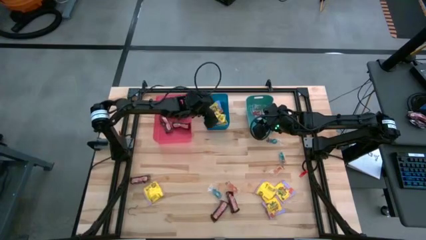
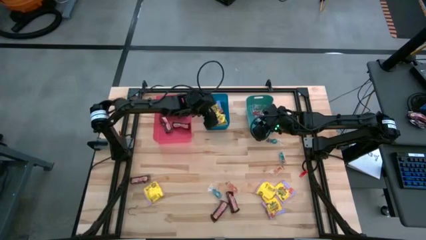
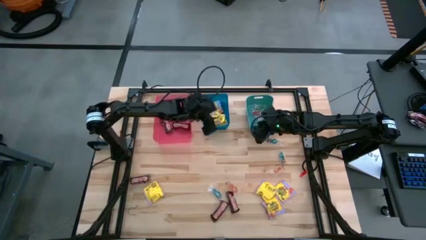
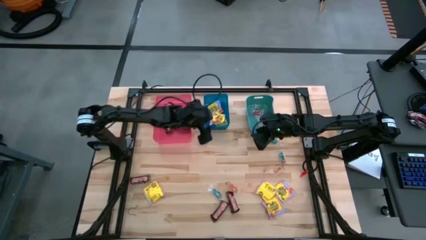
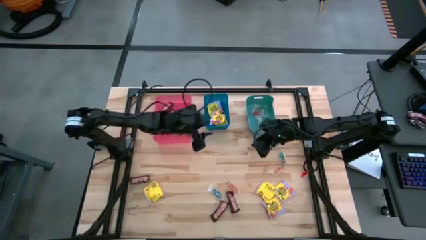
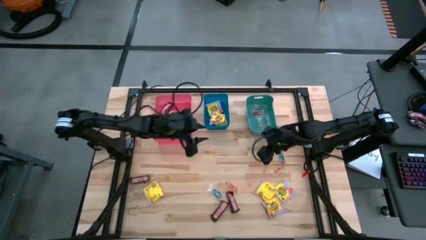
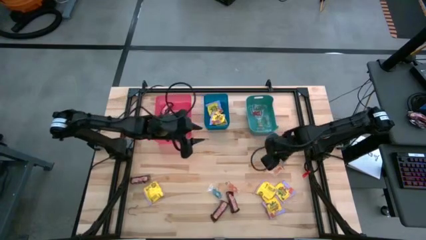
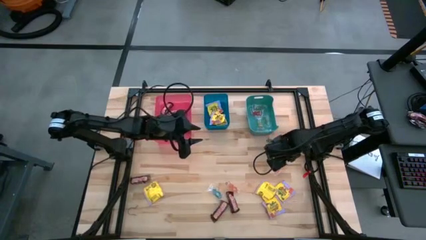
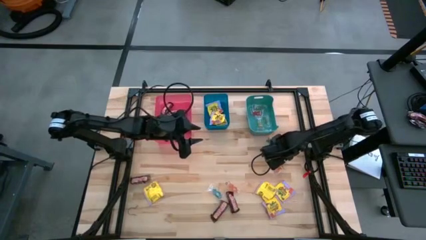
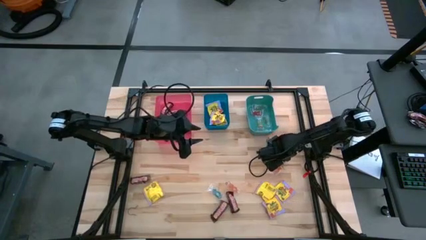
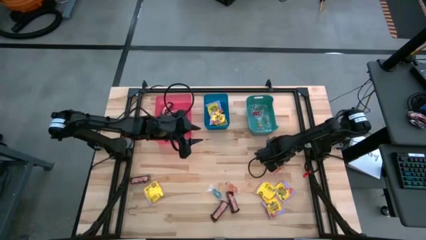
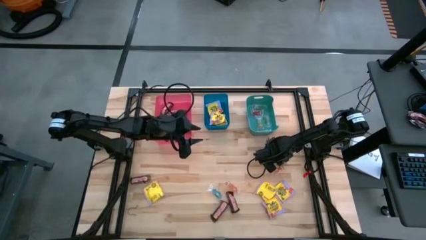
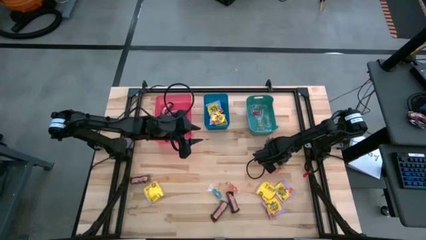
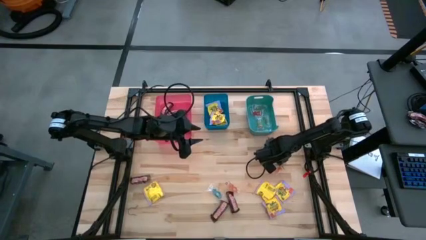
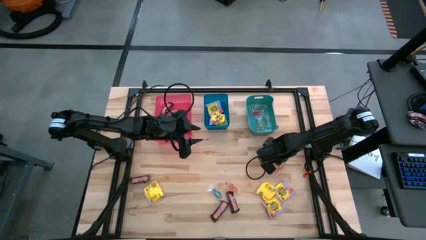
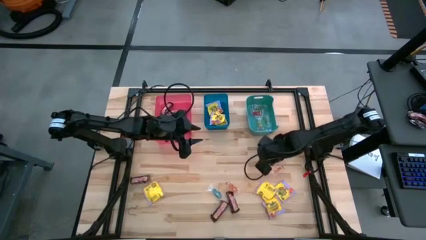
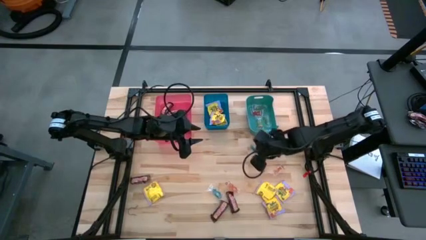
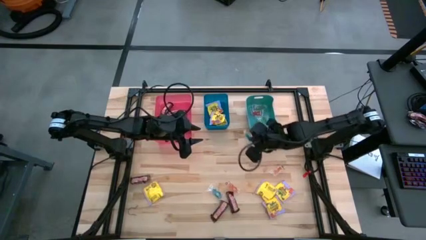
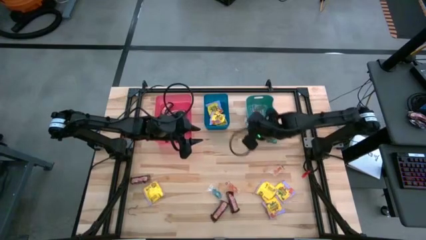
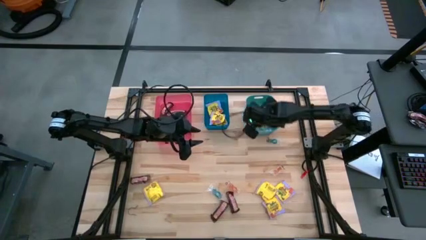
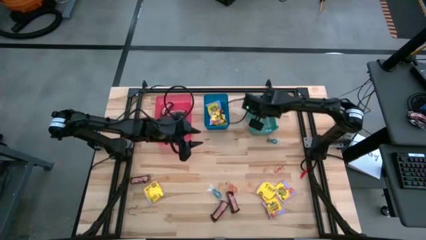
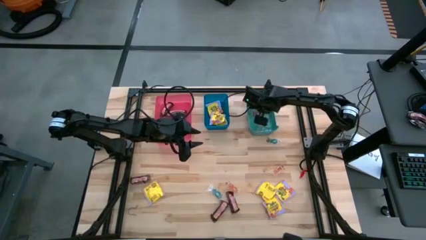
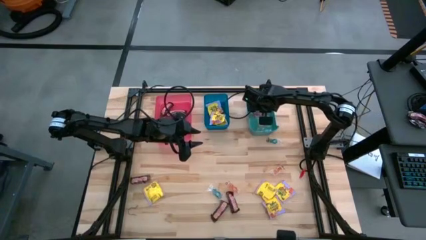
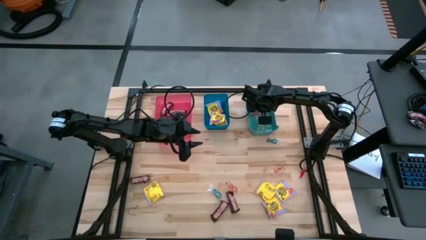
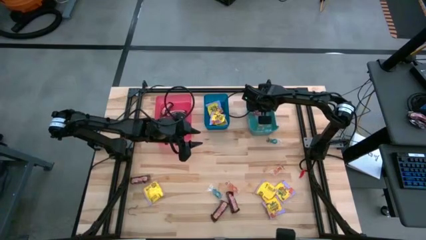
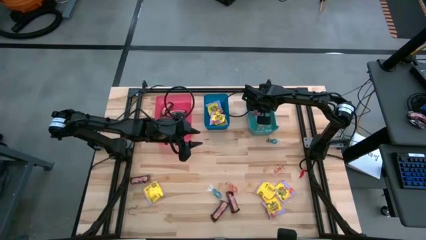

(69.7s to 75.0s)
Task: Sort candy
Put the blue gummy candy into the green bin

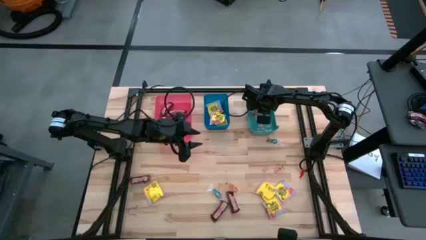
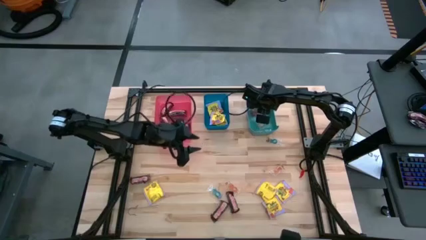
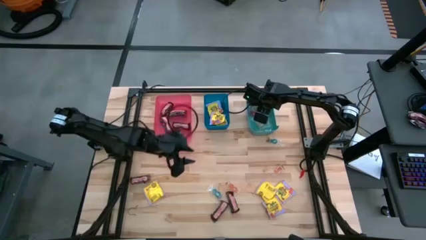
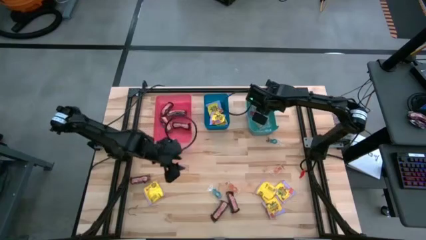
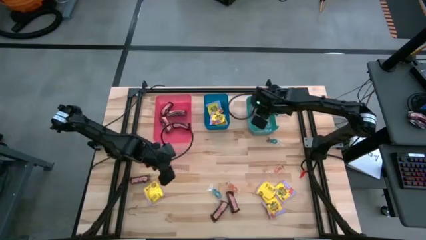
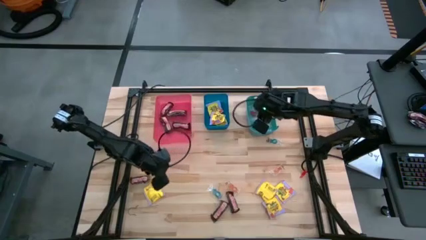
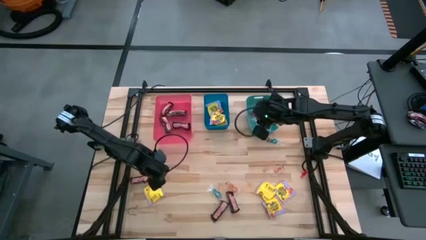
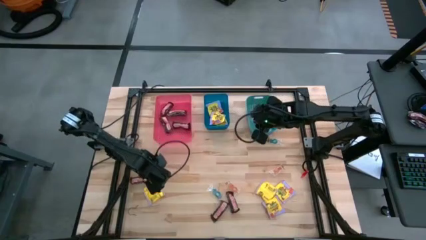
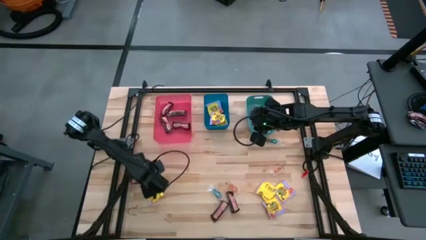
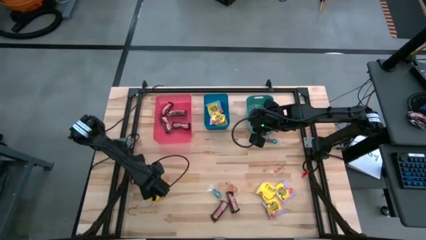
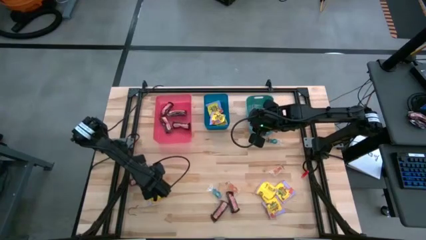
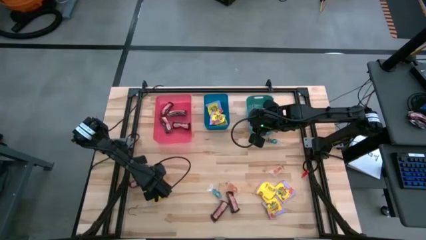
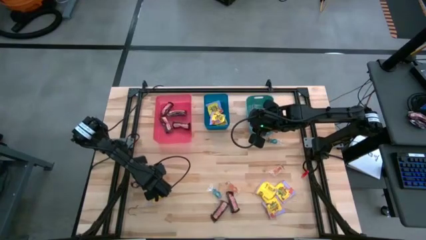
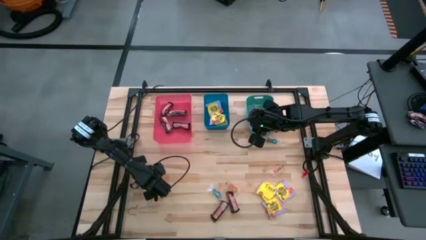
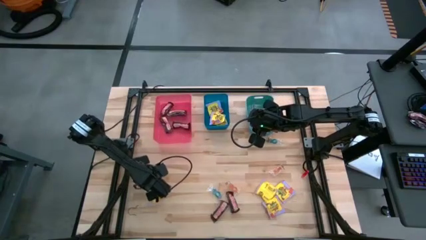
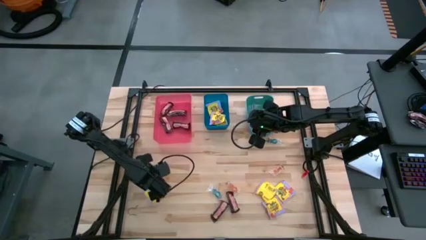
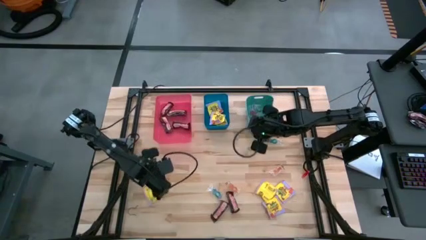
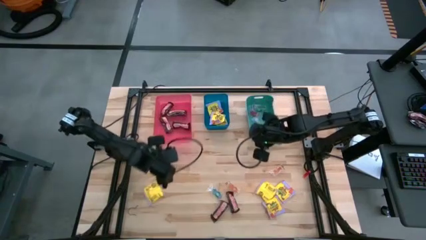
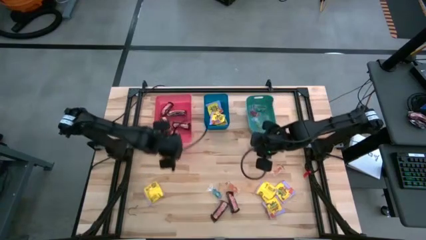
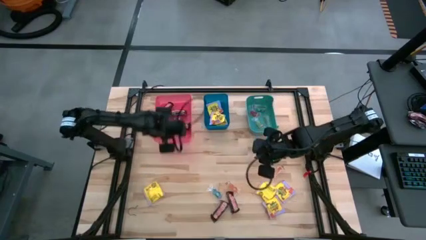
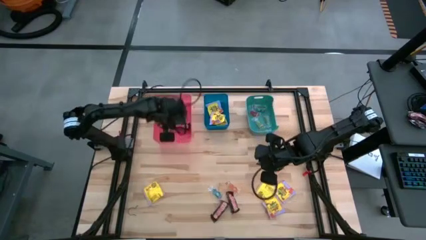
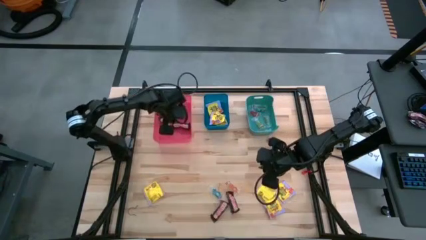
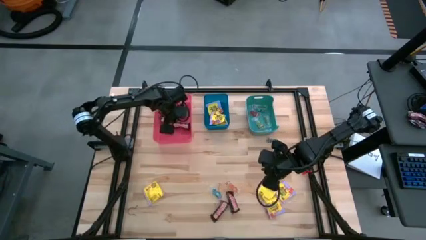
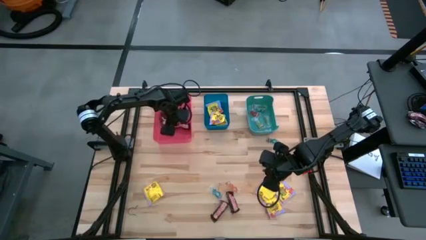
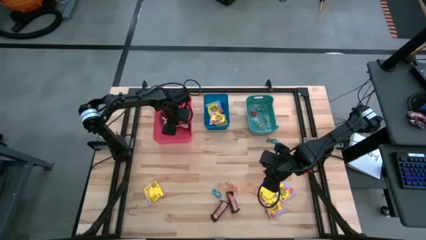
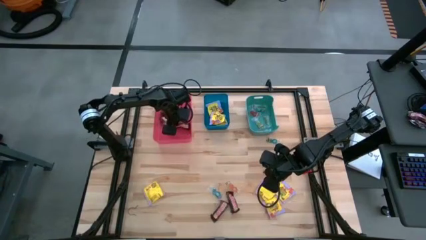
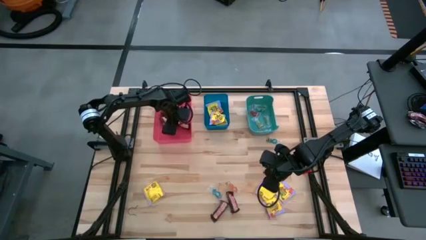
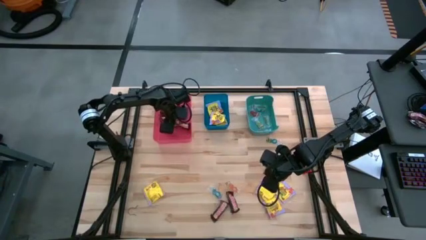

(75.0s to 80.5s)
Put the chocolate bar into the red bin

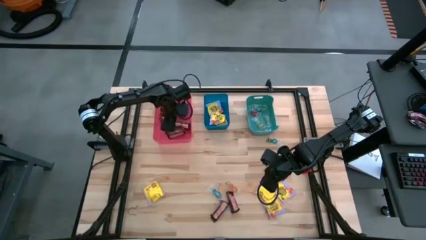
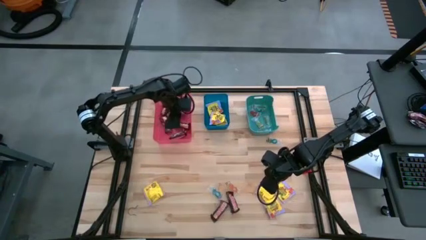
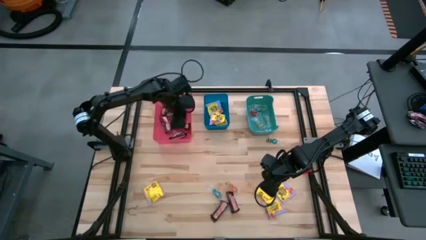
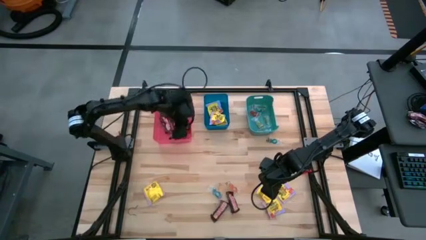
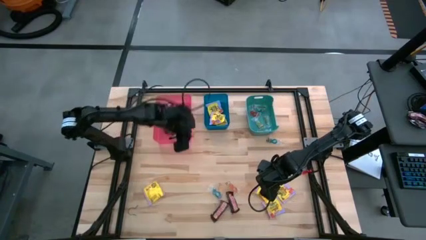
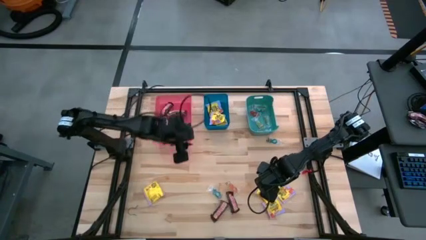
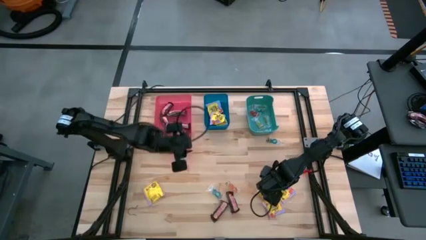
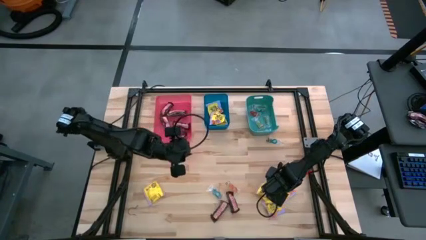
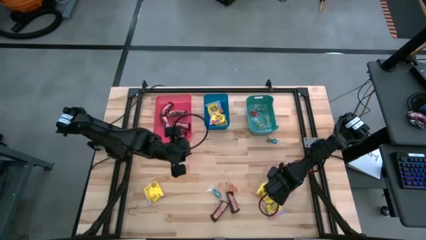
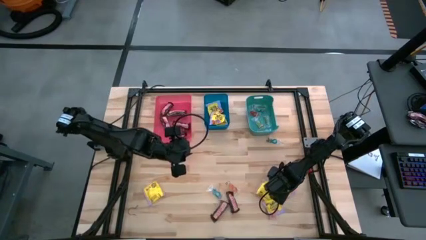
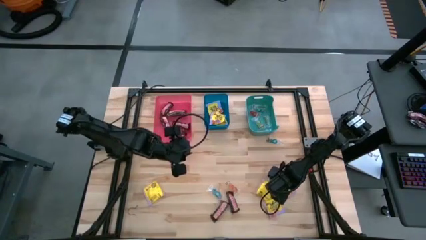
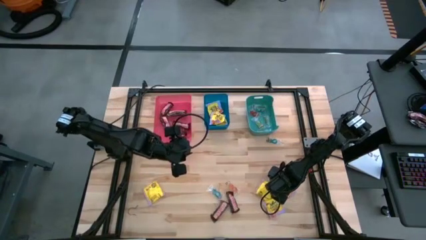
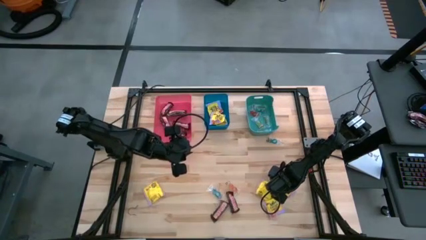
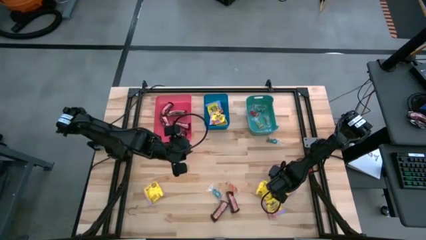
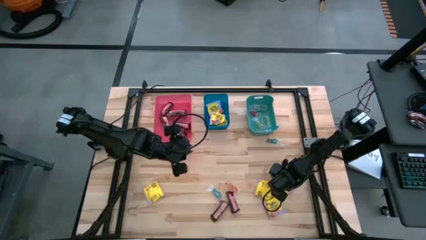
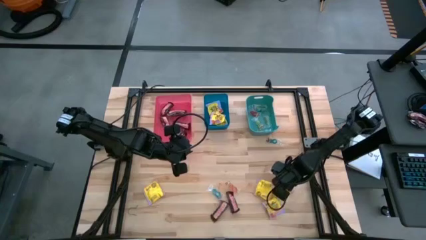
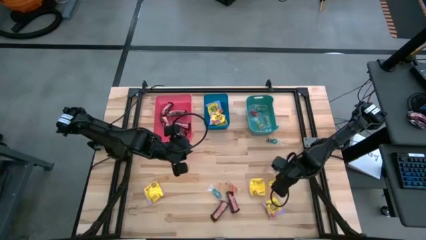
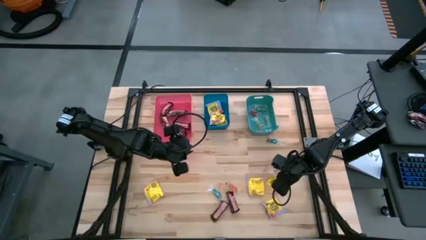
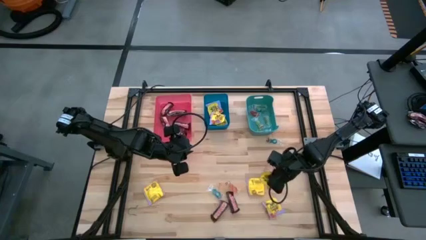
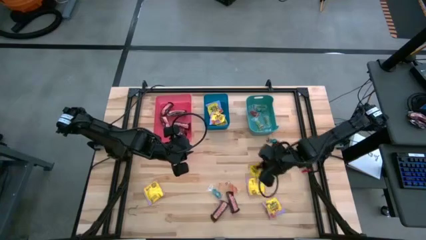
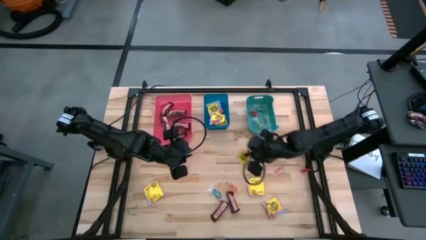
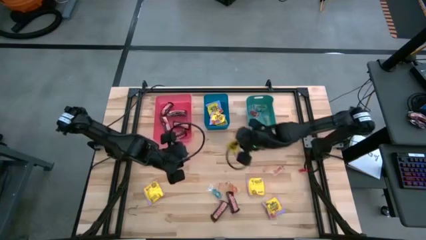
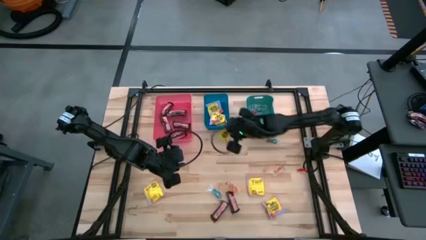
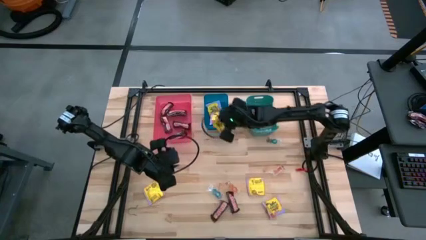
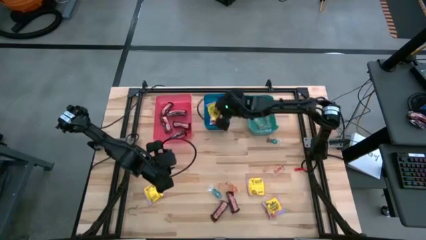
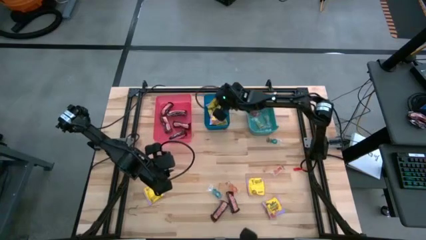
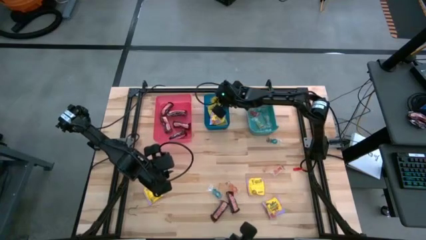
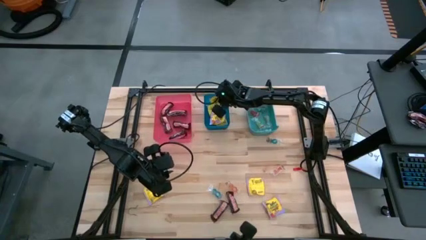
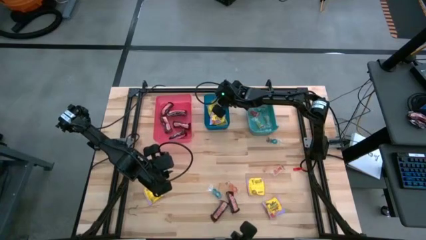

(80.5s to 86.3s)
Put the yellow candy into the blue bin

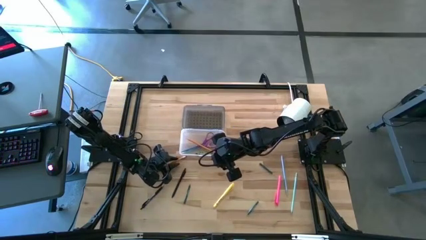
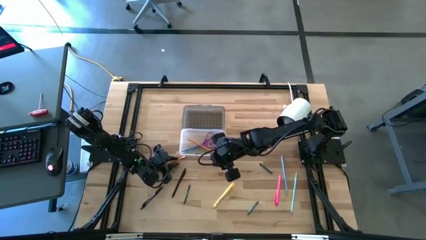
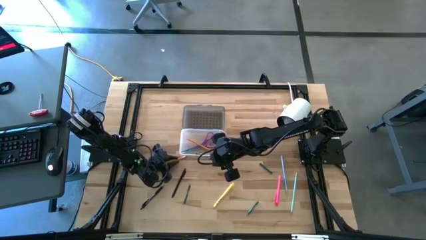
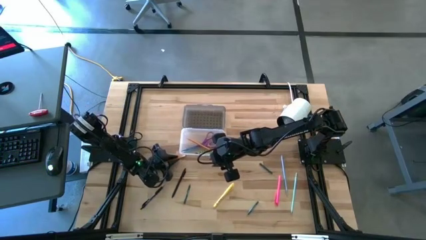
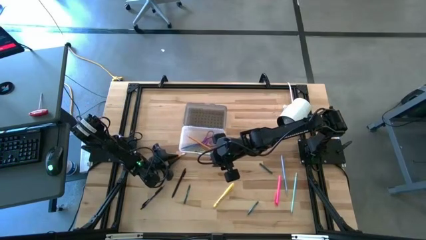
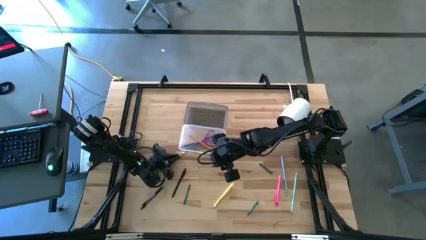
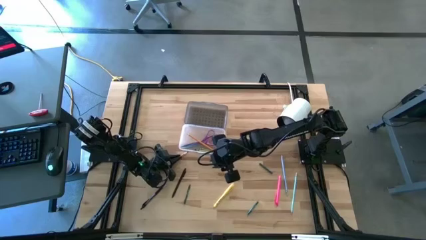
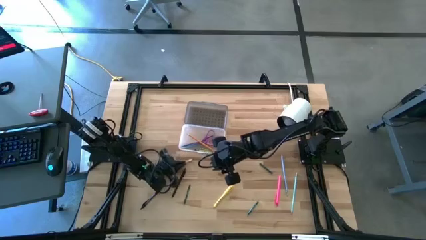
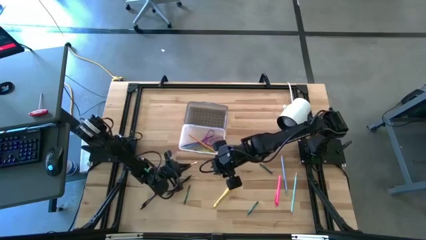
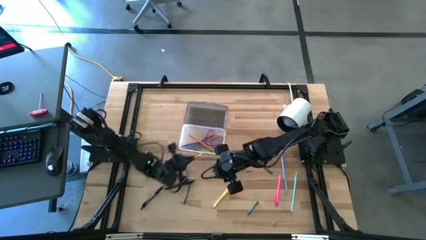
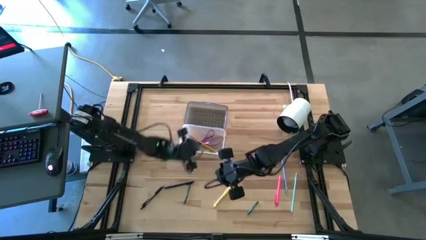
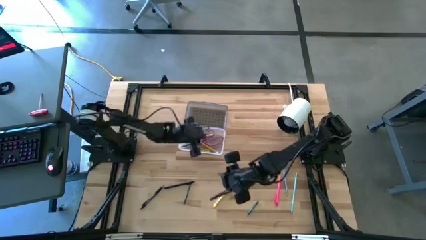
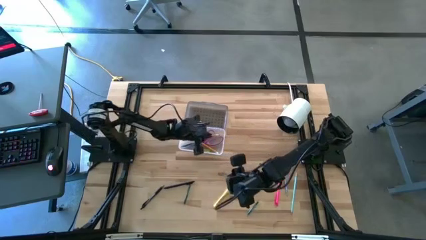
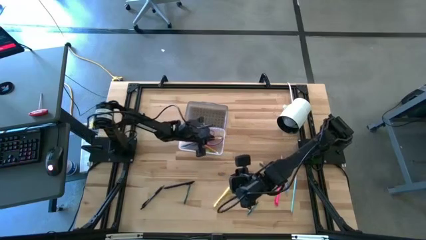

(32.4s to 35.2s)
Task: Pick & place school supplies into a supply box
Put the orange pencil into the black box
